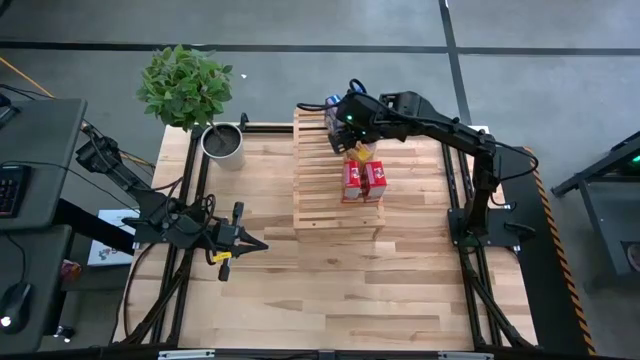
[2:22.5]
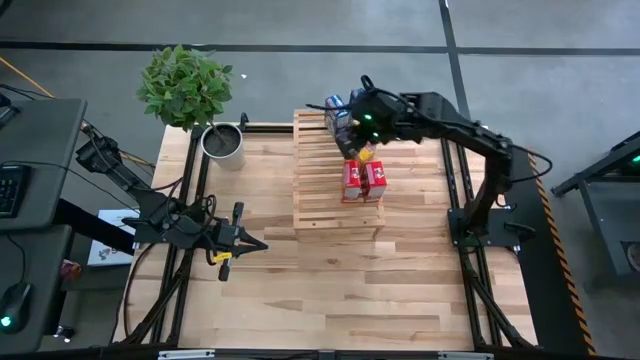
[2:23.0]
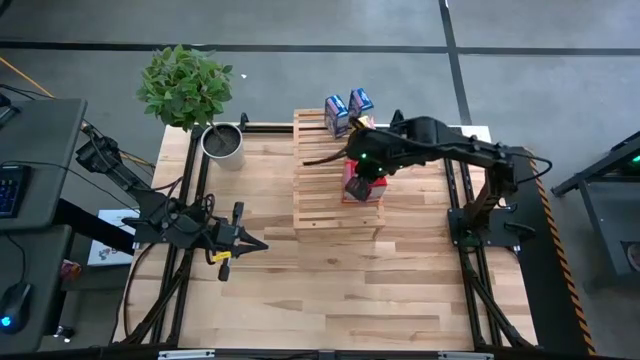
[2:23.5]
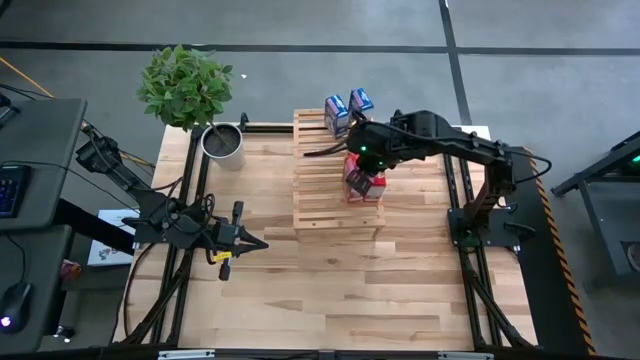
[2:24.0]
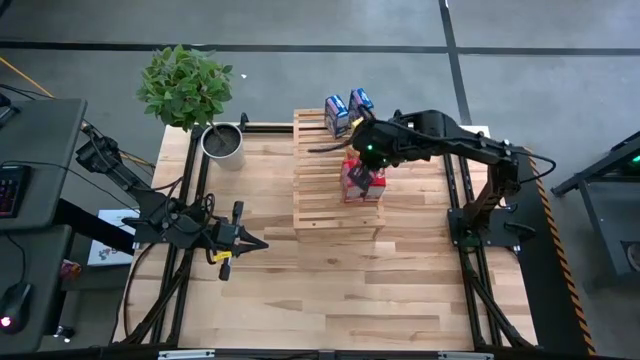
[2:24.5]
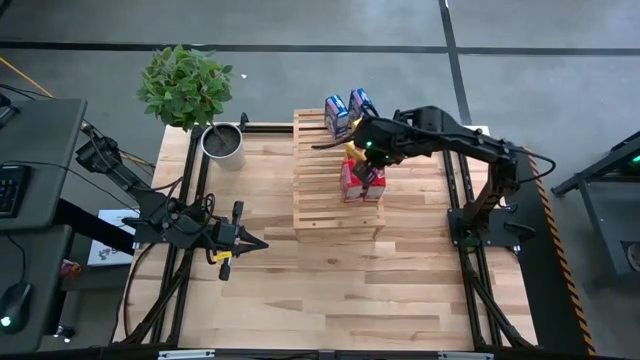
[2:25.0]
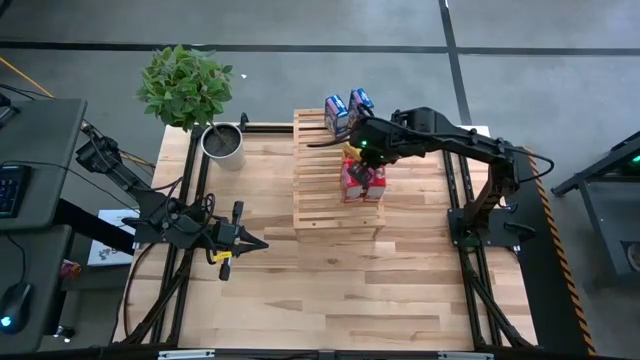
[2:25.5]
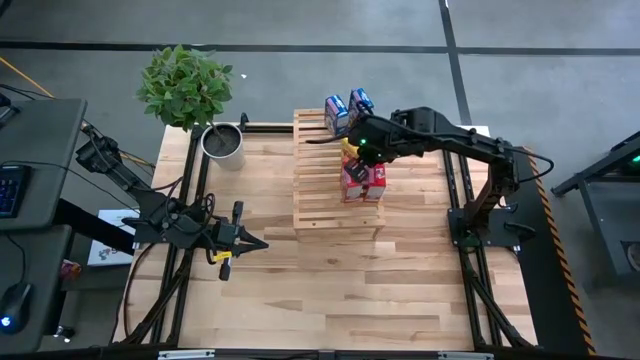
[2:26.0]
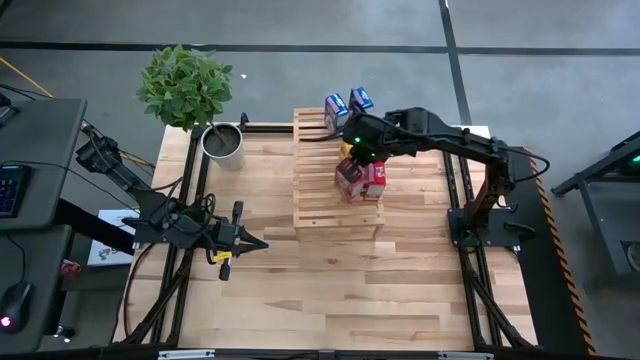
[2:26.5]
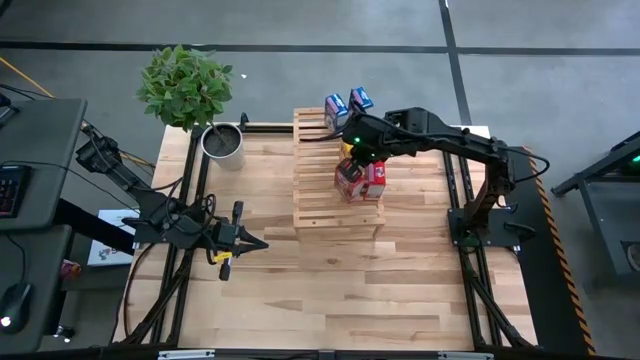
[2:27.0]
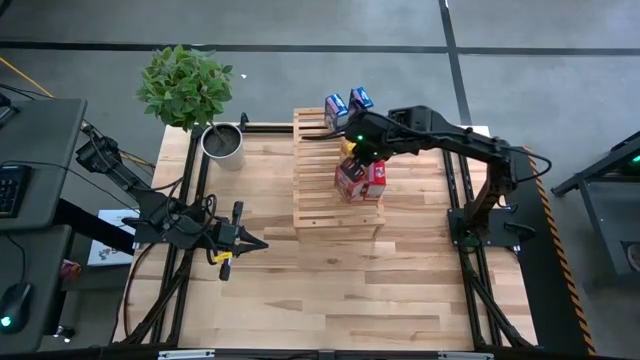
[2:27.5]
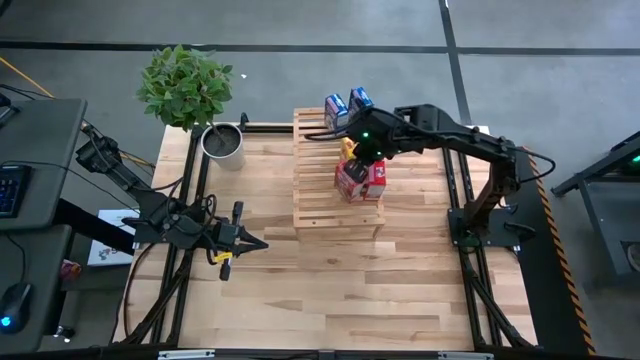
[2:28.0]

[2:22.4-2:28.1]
Task: Stack cereal on shelf
Adjust the cereal boxes on the shelf

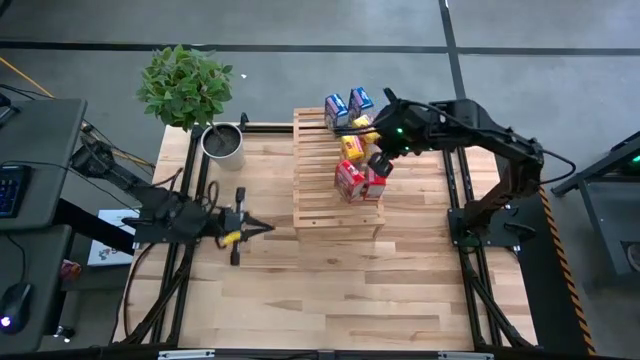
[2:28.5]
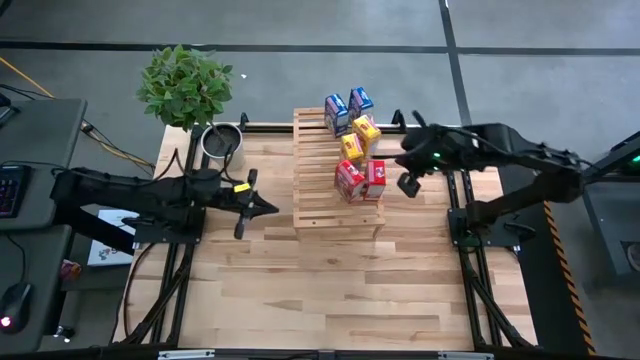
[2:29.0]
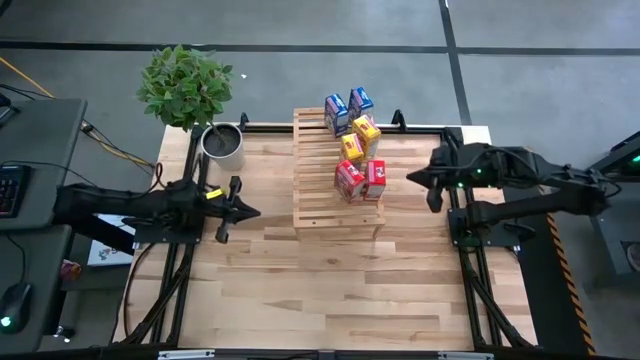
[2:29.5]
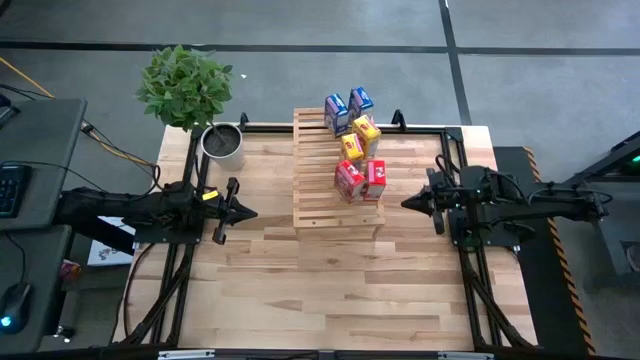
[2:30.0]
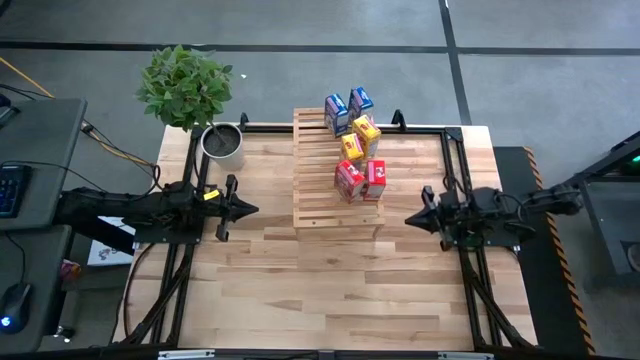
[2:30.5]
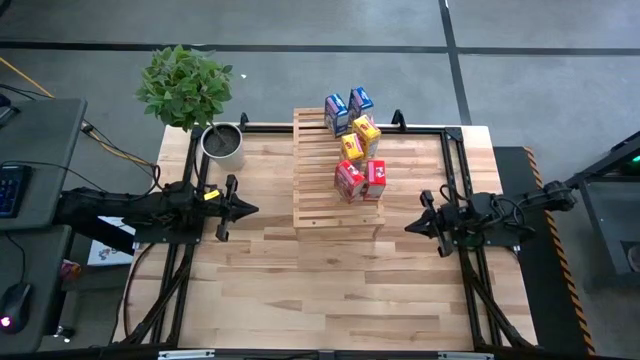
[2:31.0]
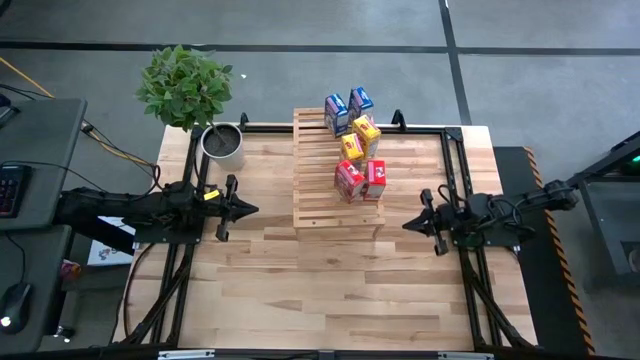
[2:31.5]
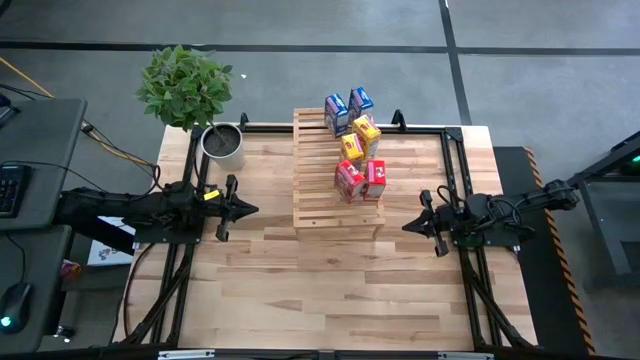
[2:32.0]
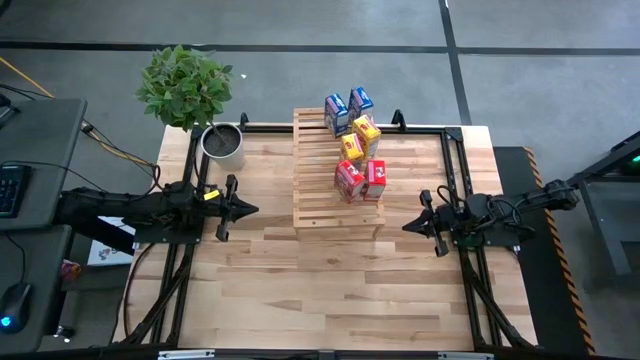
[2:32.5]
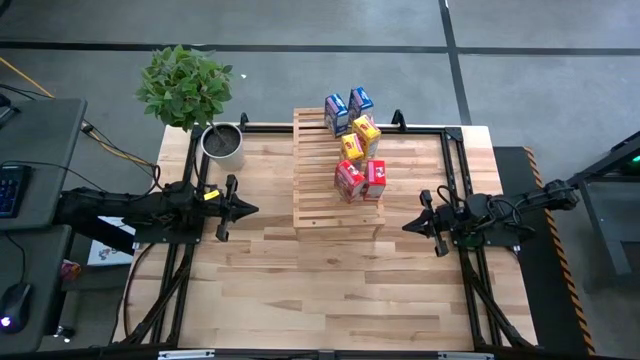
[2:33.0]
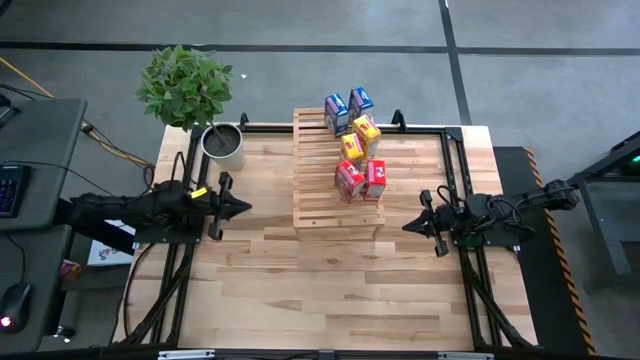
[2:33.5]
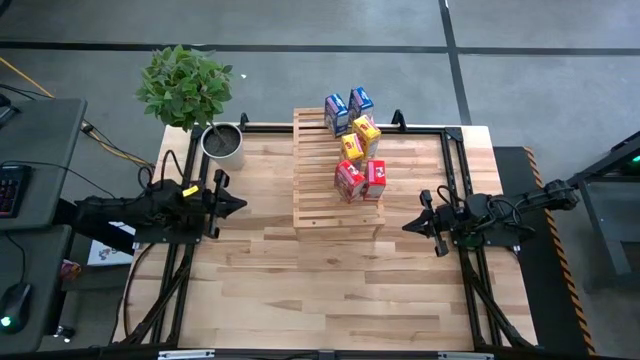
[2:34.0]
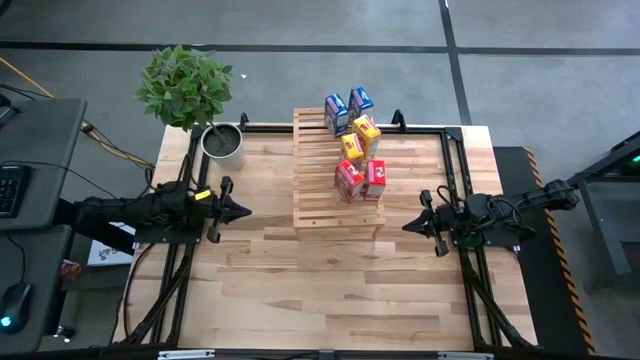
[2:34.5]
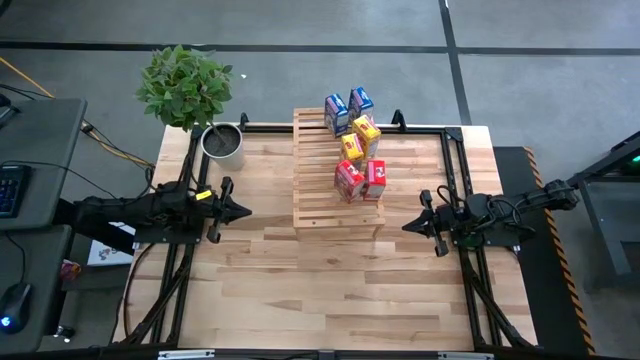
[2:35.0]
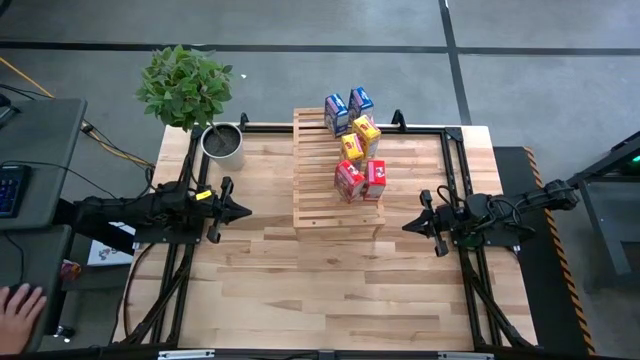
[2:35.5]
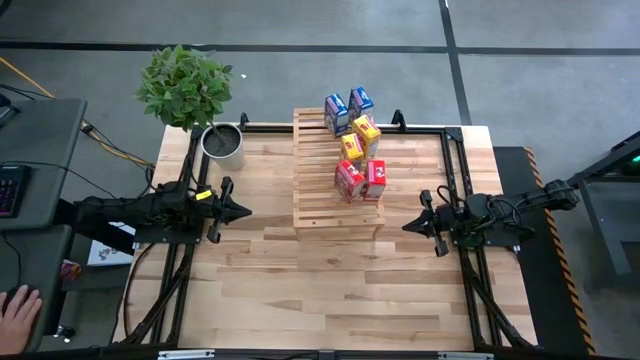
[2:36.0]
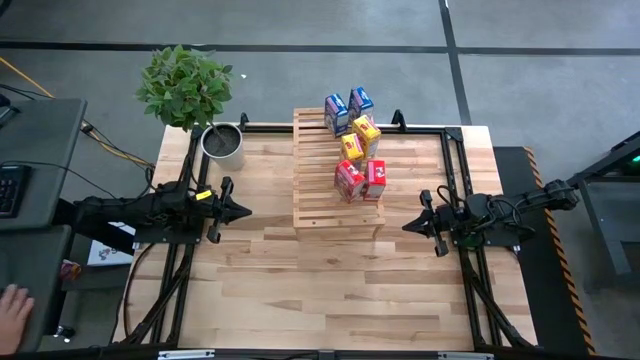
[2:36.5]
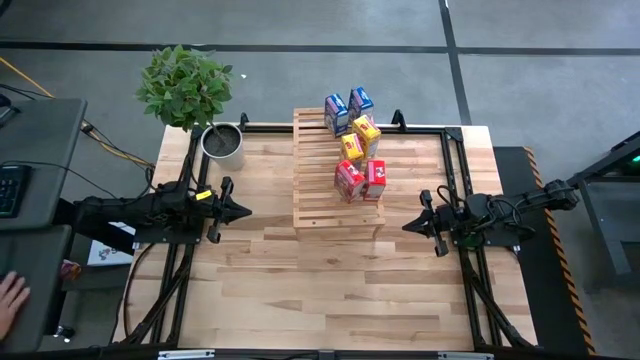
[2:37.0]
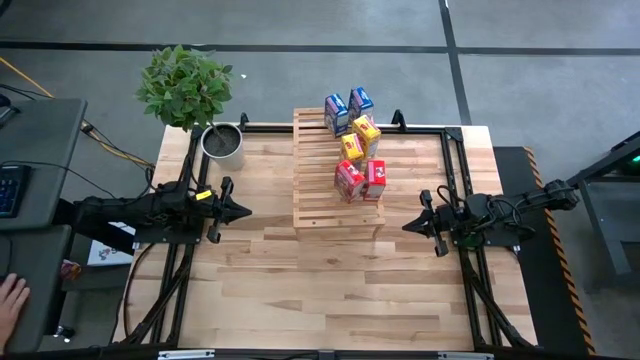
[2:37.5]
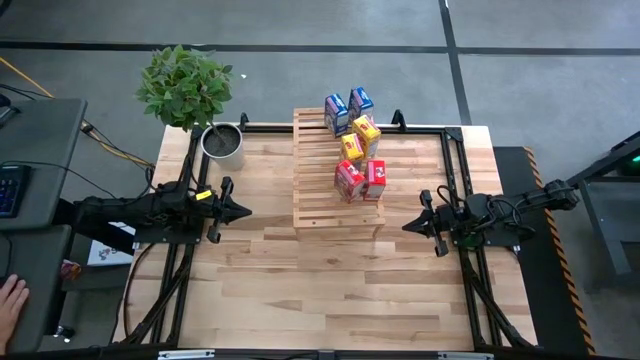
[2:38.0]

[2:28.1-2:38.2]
Return to Home Position

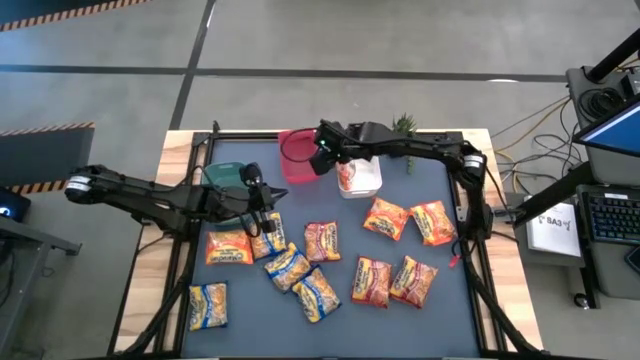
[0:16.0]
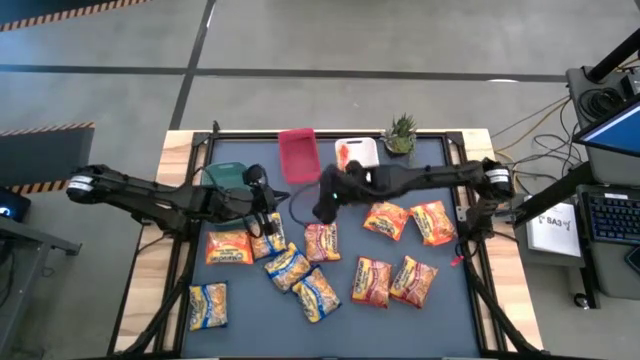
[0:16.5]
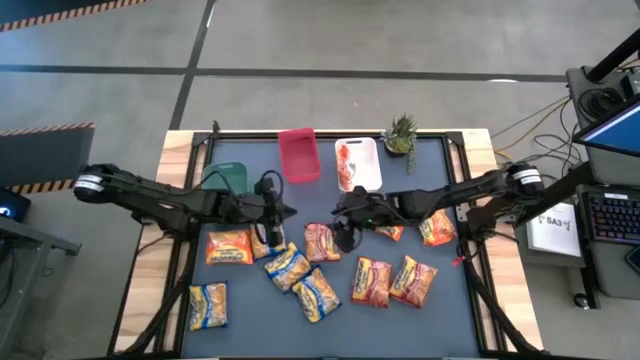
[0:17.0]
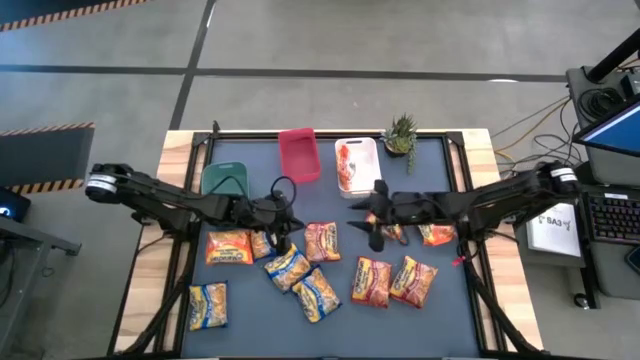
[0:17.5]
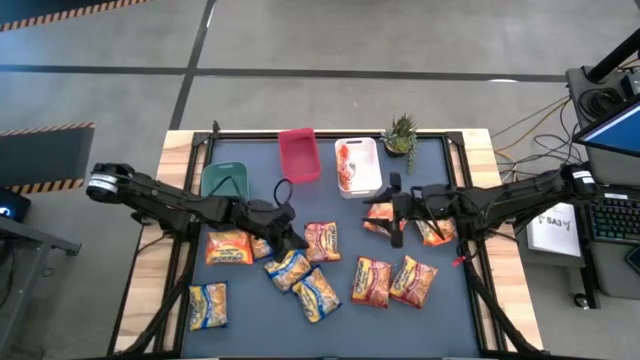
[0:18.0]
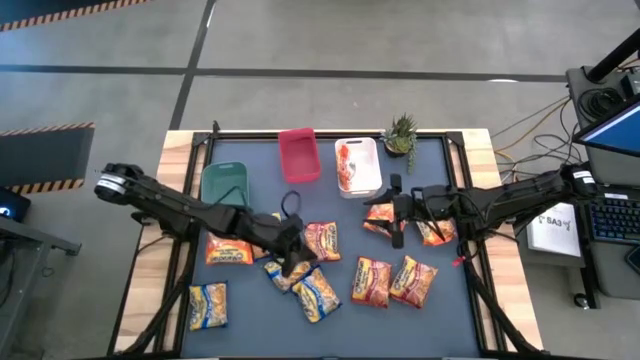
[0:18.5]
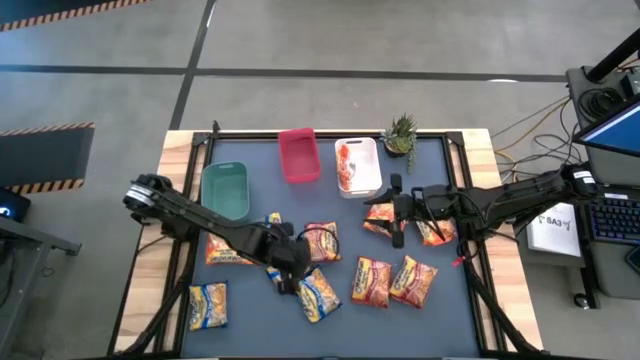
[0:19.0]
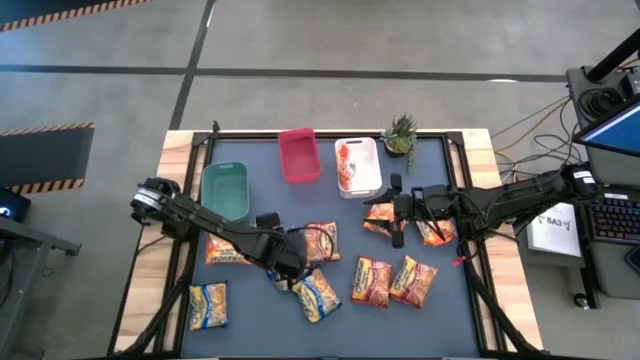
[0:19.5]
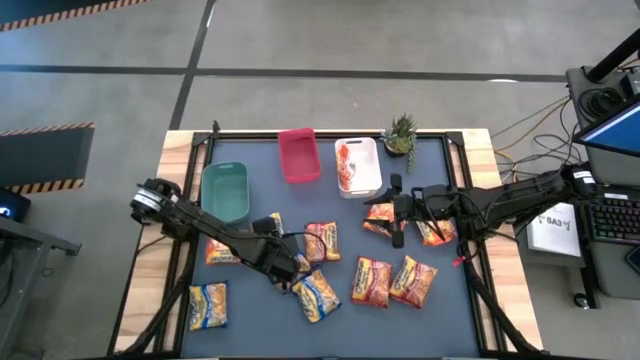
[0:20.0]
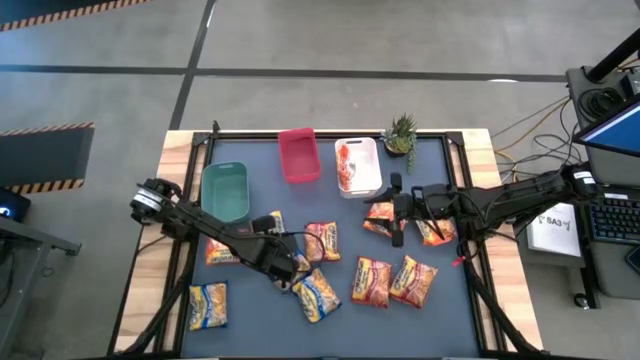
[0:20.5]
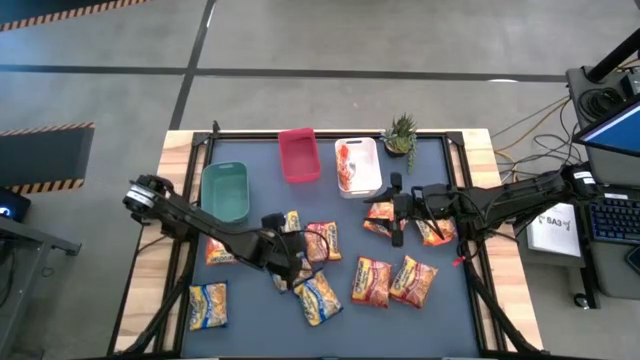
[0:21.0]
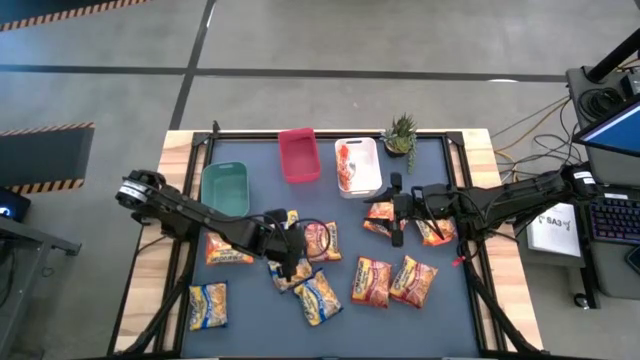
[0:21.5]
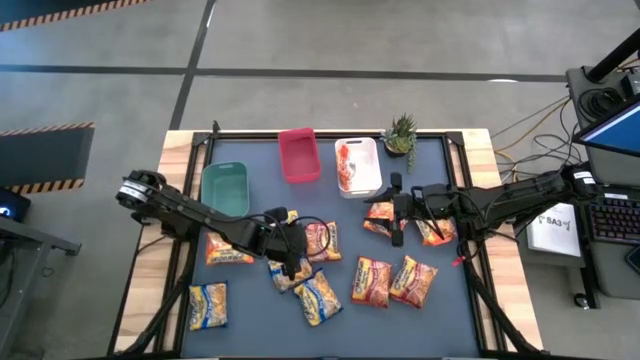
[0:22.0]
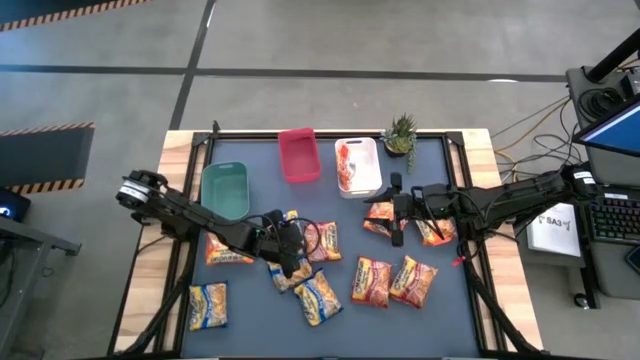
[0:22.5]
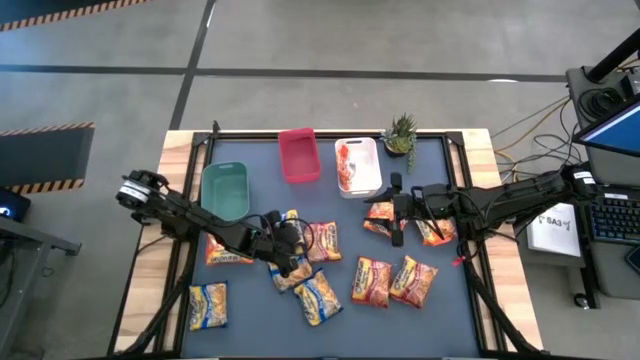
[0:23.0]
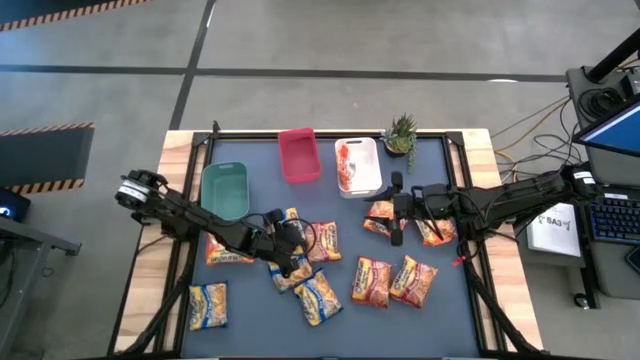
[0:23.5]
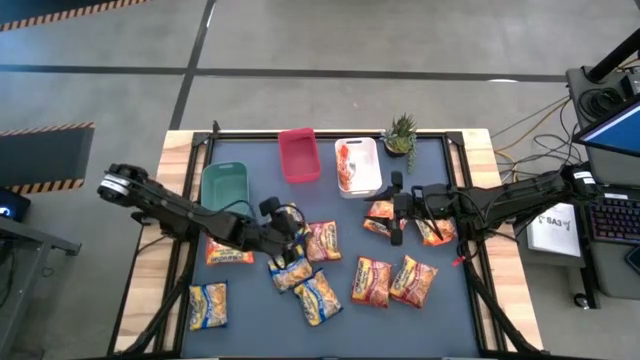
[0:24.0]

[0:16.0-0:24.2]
Task: Sort Maruchan noodles
Put the blue noodle pack into the red bin
